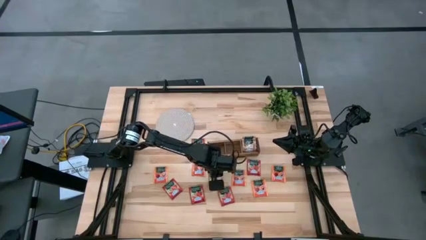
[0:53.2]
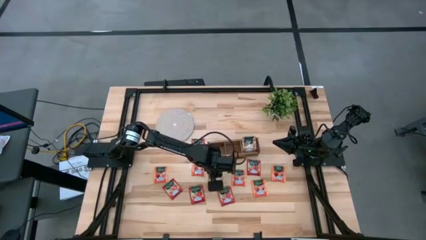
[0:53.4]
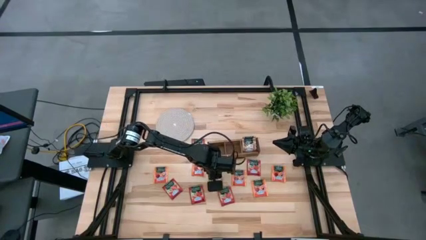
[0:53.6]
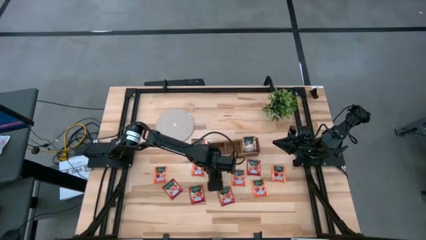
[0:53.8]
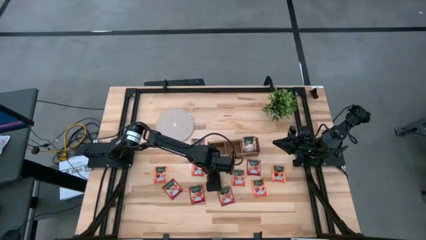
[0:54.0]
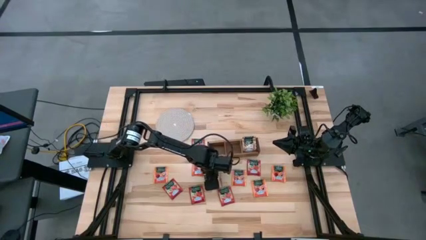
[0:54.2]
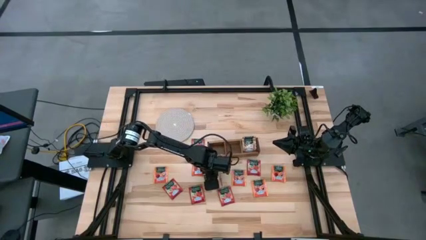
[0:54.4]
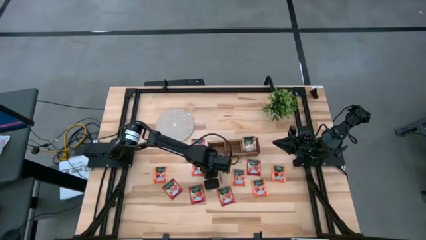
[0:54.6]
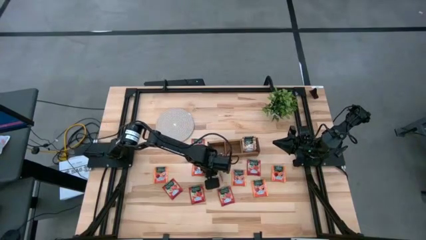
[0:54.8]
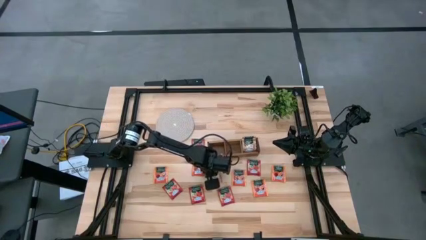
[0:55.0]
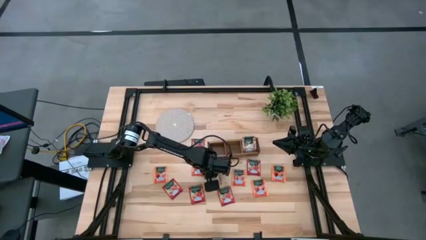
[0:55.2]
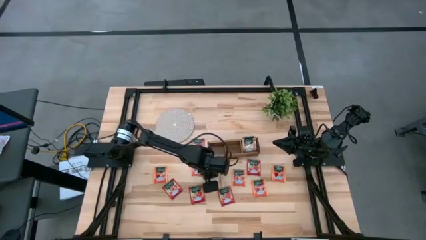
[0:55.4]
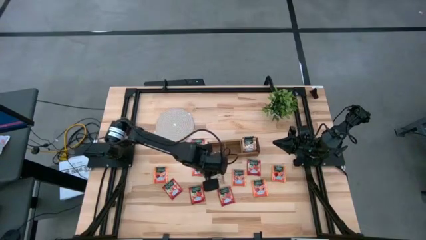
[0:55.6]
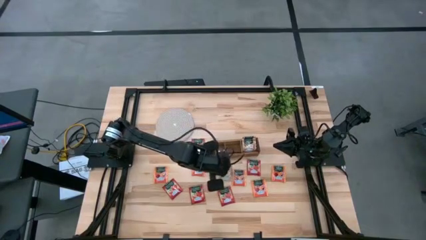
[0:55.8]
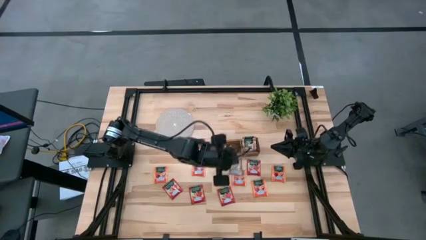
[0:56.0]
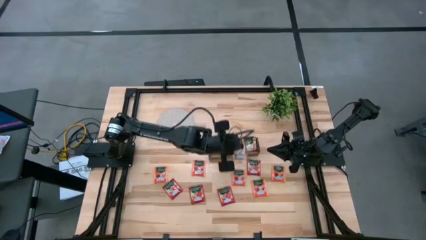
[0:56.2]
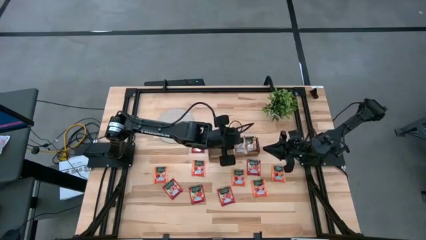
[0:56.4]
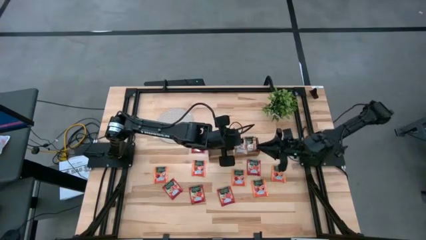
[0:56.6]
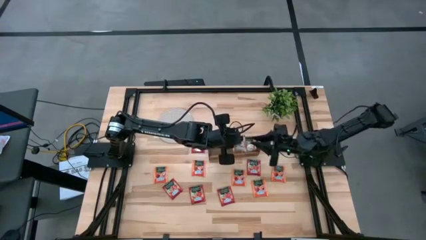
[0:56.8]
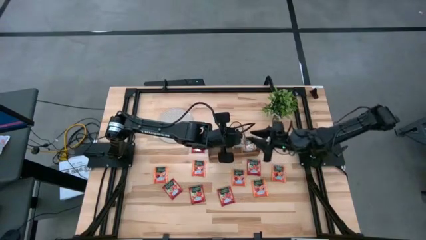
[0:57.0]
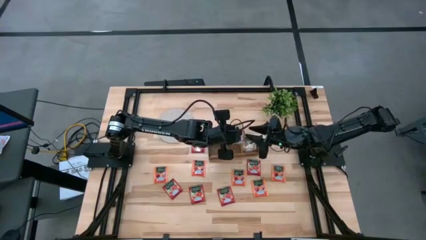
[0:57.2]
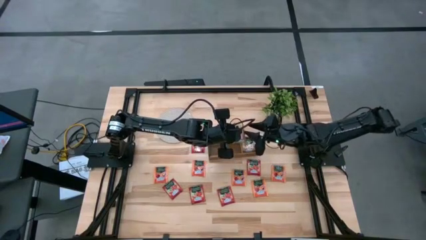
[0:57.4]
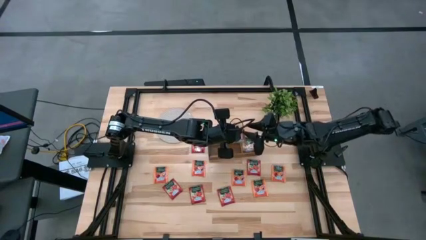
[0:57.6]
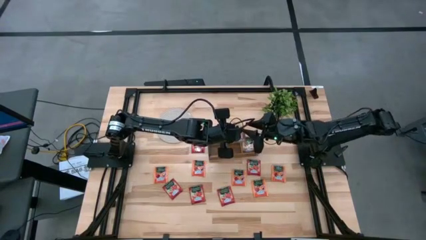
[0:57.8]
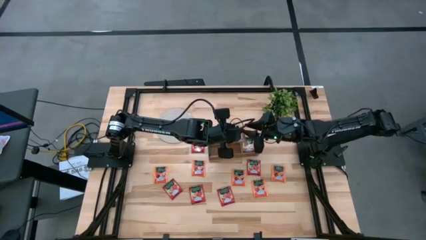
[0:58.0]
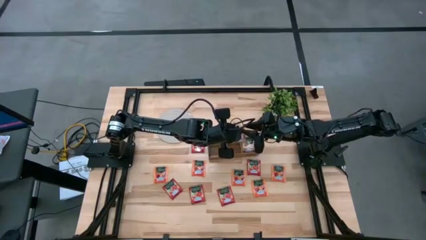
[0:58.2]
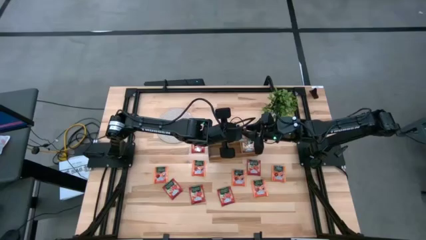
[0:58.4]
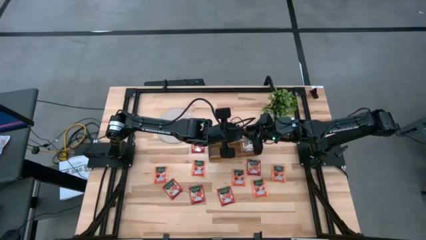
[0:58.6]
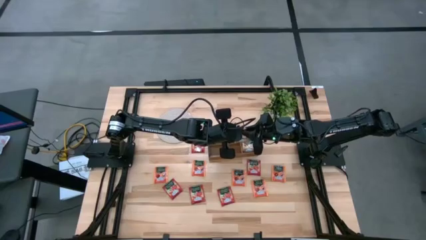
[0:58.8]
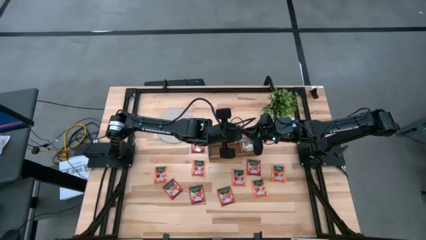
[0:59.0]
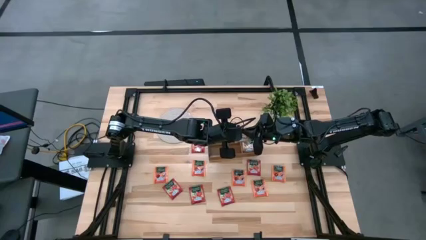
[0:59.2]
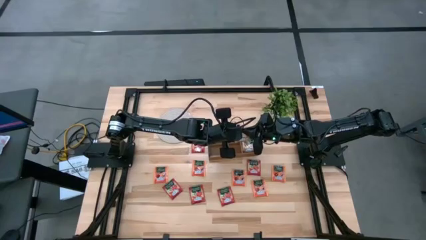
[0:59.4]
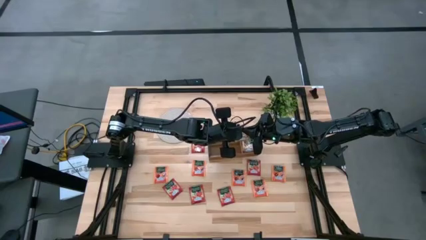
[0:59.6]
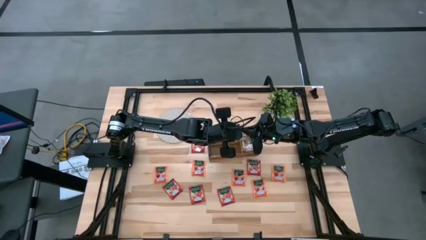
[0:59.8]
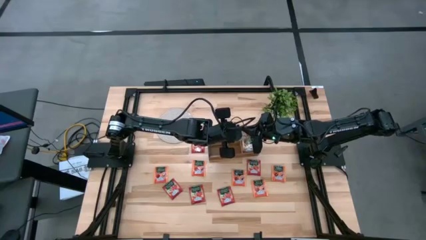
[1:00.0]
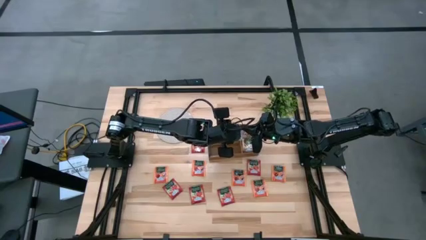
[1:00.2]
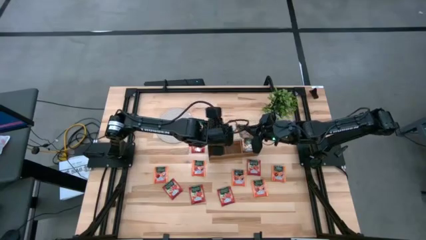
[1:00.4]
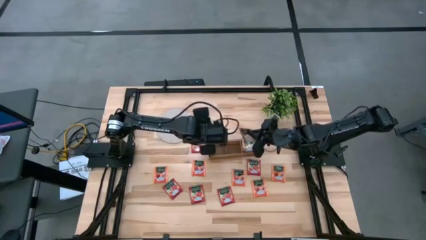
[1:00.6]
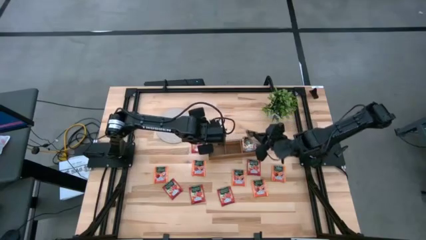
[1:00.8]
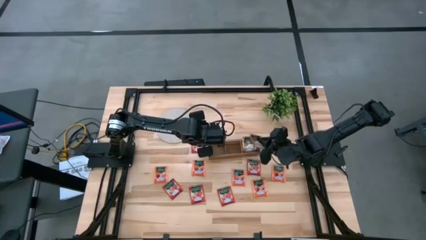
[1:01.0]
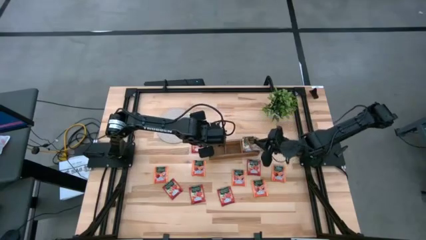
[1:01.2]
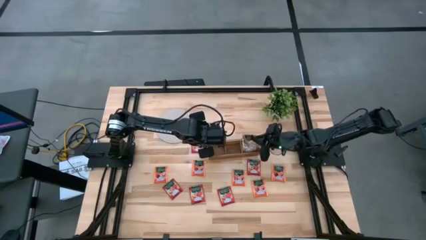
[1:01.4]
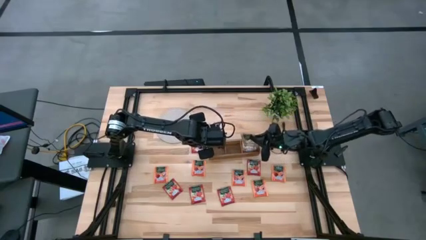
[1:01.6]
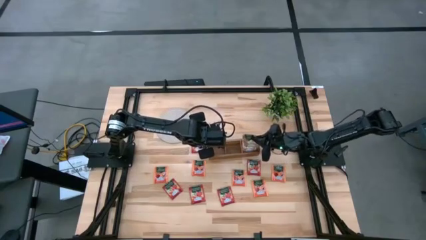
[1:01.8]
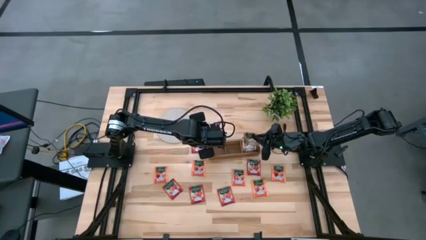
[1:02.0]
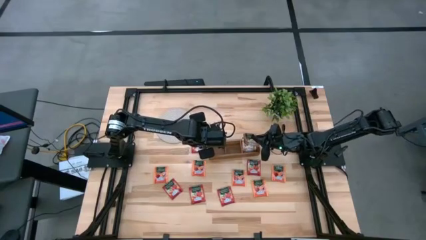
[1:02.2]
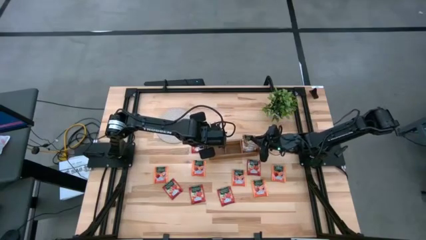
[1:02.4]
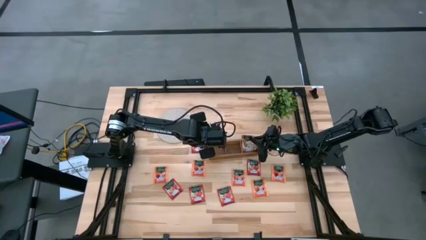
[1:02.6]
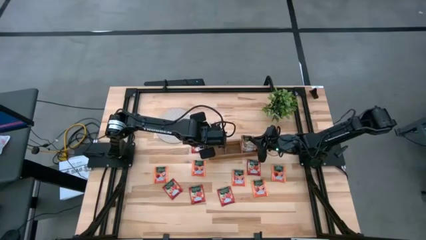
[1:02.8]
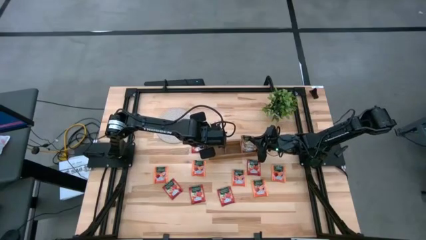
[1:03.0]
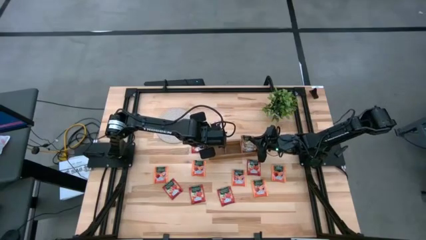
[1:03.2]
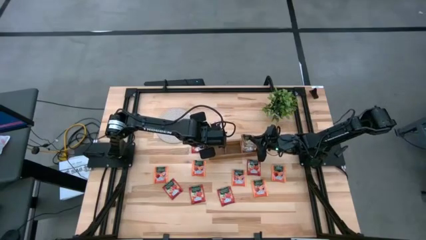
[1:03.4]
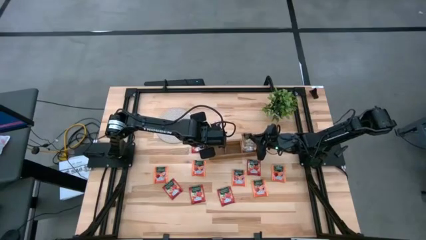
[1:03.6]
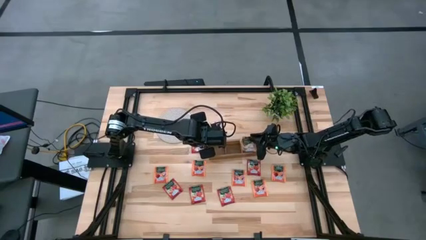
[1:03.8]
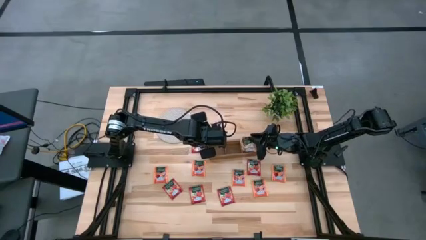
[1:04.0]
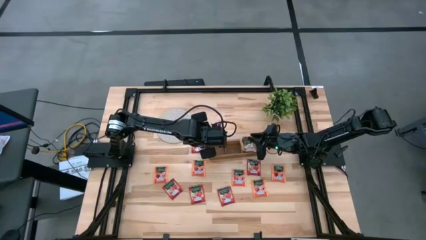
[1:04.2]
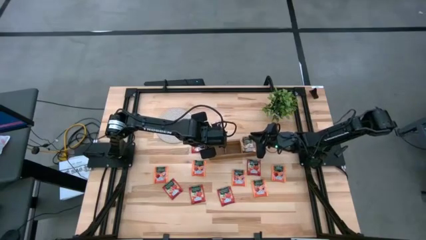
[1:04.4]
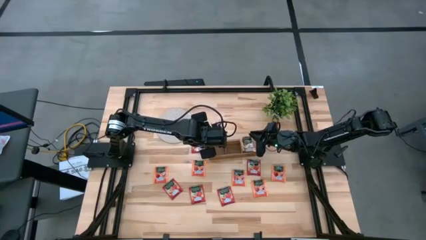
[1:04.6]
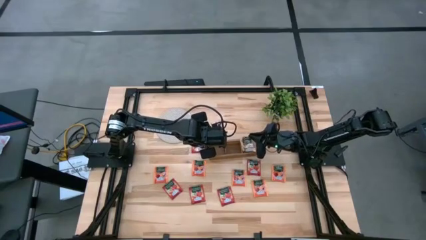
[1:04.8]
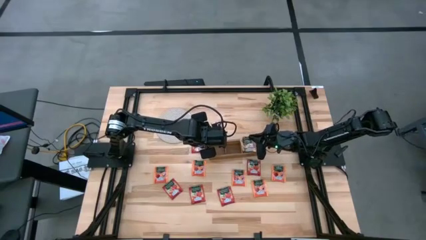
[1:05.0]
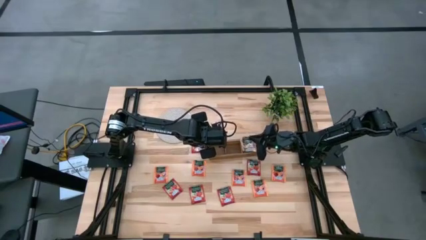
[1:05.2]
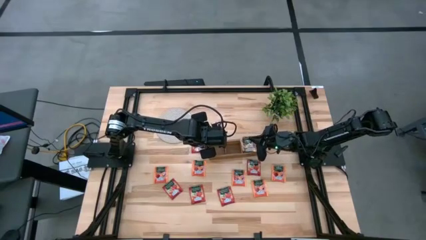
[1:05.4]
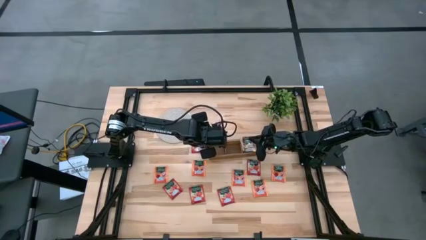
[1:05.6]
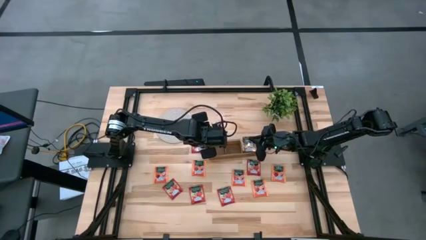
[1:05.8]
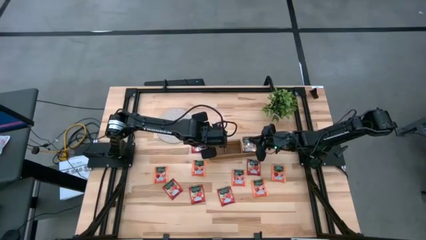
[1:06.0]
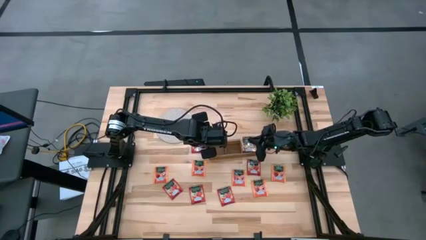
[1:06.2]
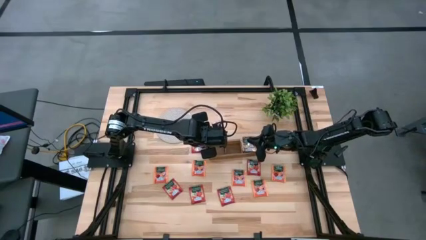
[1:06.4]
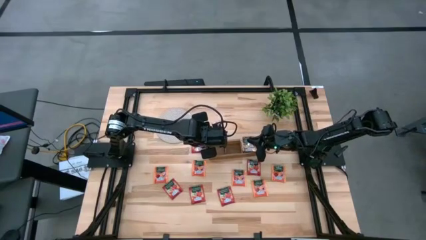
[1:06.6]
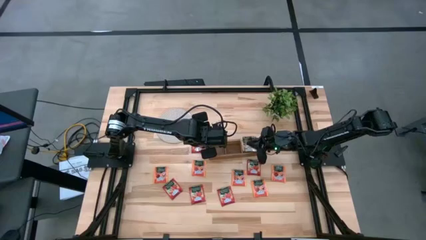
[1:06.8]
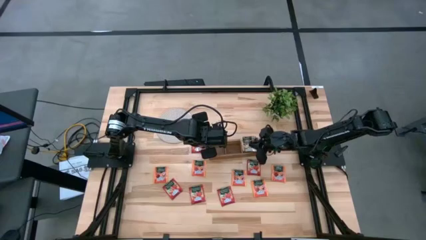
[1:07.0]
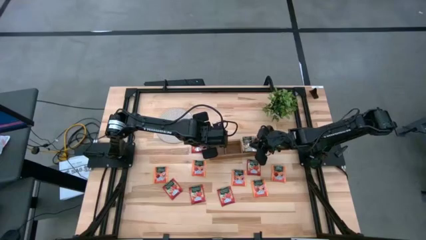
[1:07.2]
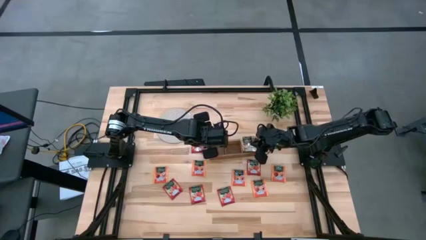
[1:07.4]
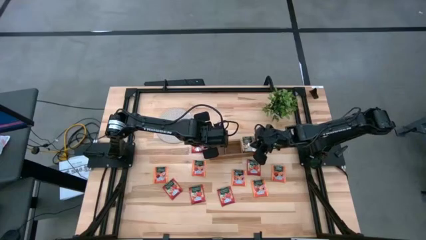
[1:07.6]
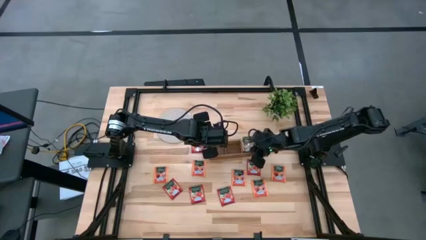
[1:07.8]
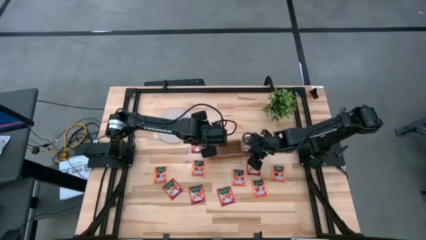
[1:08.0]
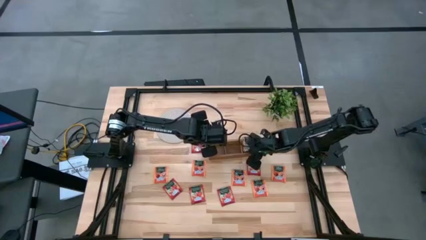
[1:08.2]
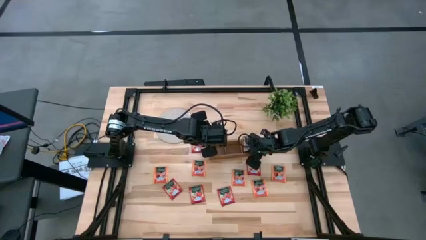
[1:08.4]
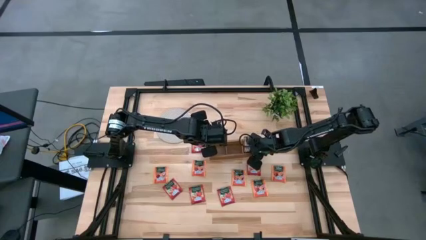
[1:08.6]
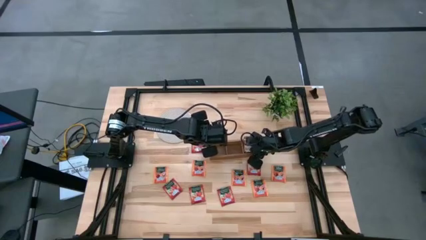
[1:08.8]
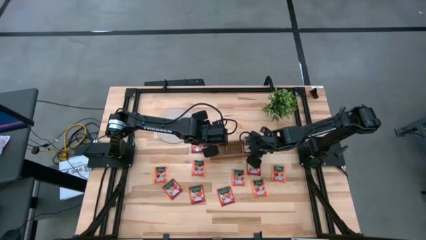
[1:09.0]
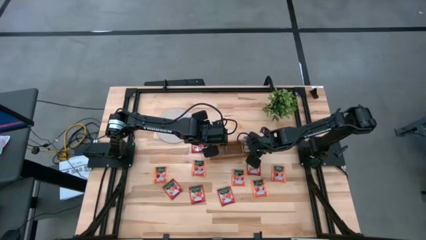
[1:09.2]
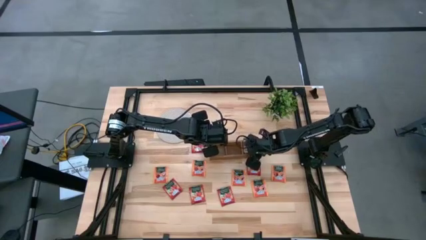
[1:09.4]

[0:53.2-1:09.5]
Task: Pick & Place Tea
Put the yellow tea bag into the right section of the wooden organizer
